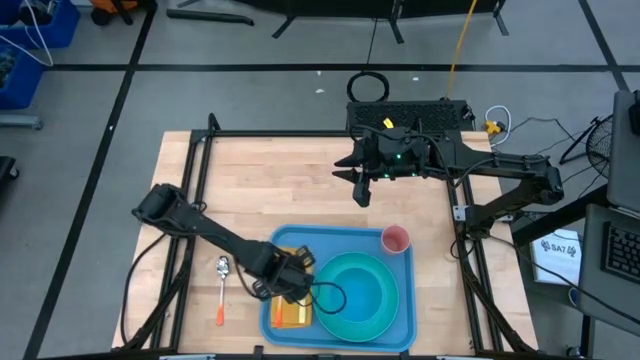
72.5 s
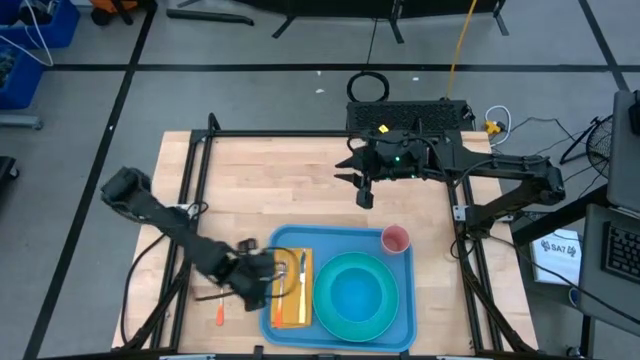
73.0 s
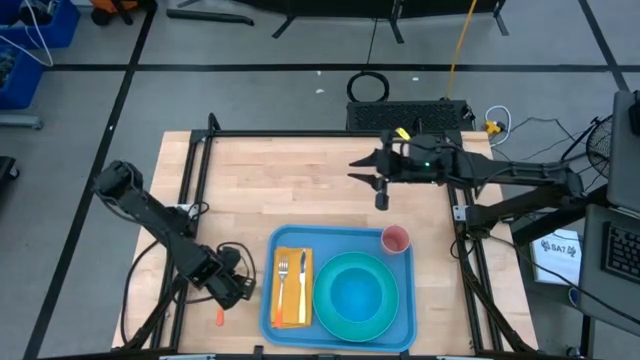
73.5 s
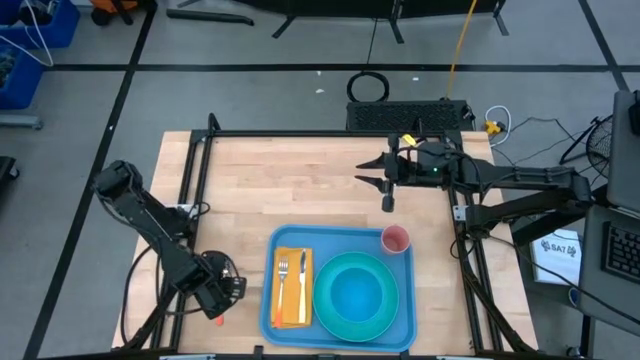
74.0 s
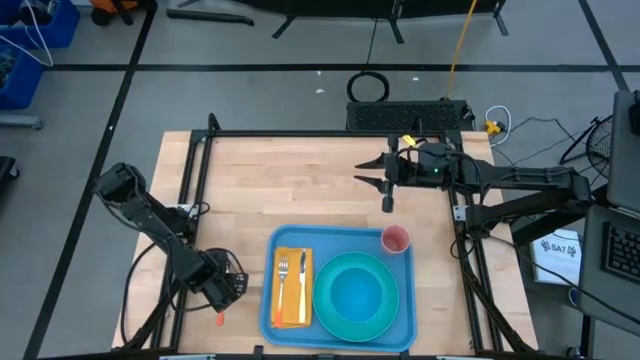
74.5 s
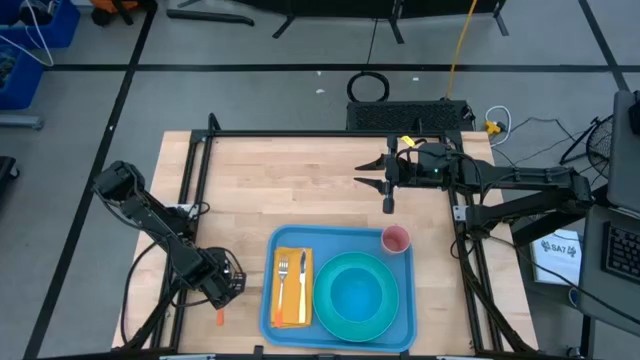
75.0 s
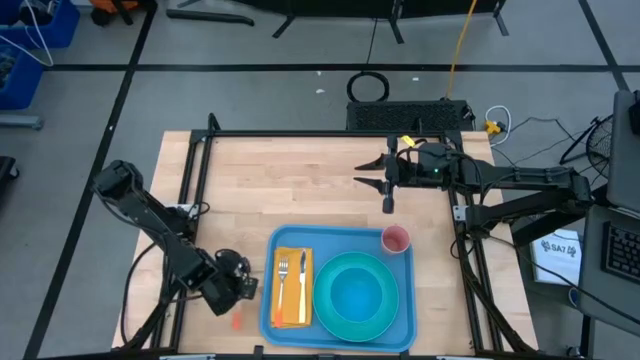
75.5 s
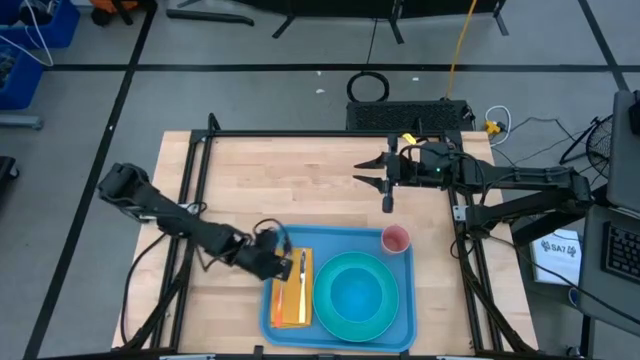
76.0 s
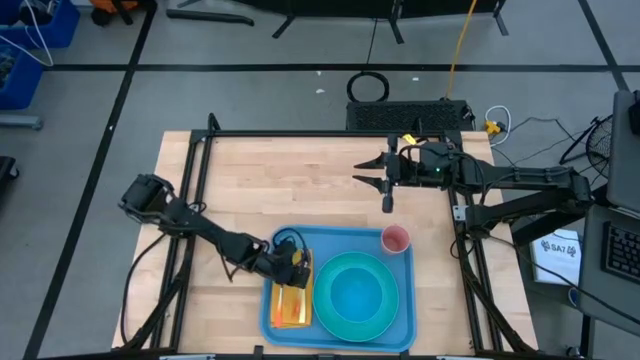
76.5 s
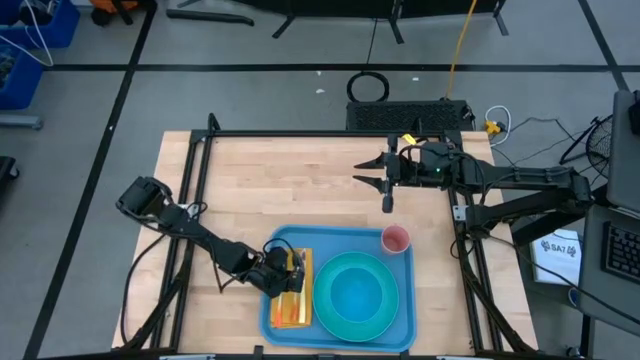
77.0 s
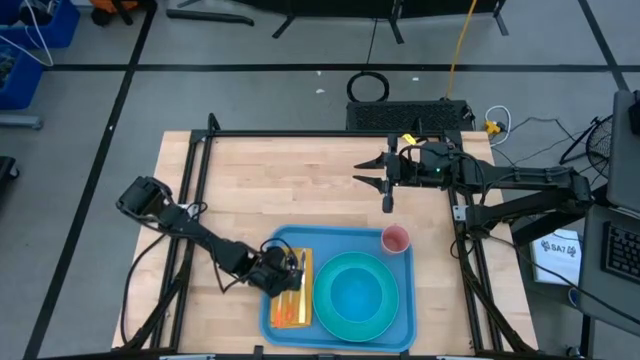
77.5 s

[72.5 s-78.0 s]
Task: Set up tray
Put the orange spoon on top of the yellow table napkin

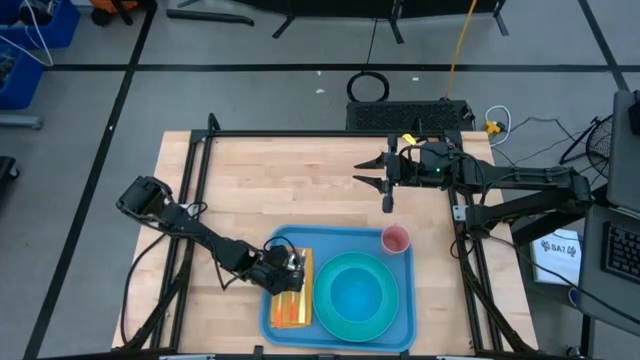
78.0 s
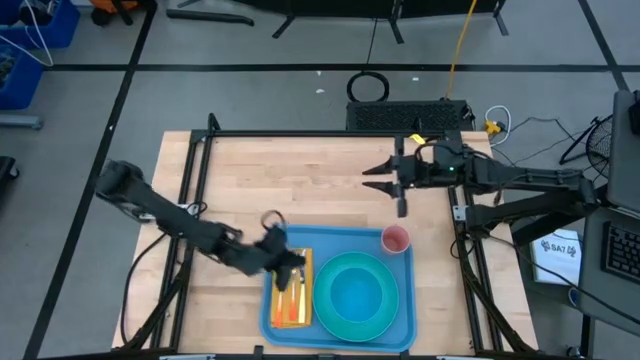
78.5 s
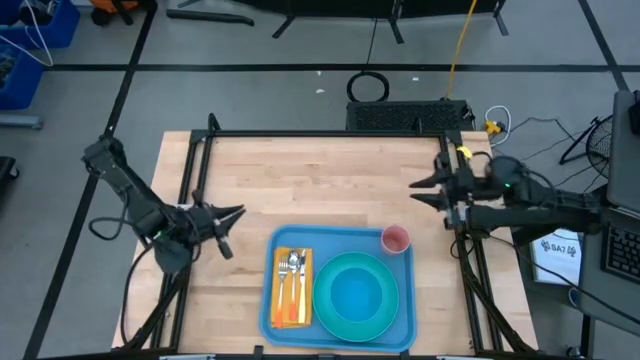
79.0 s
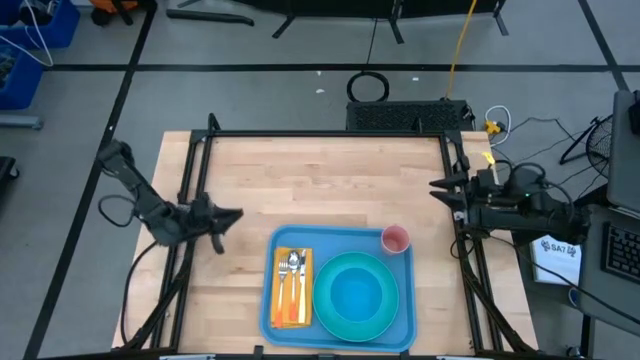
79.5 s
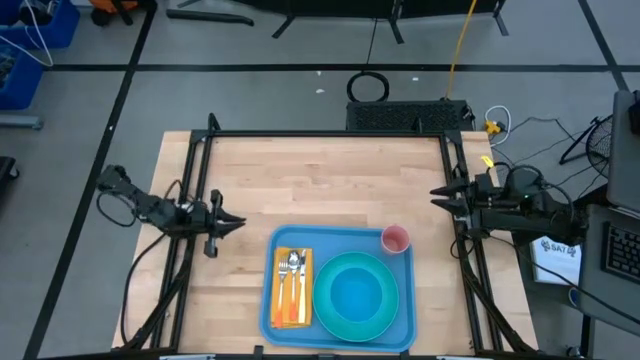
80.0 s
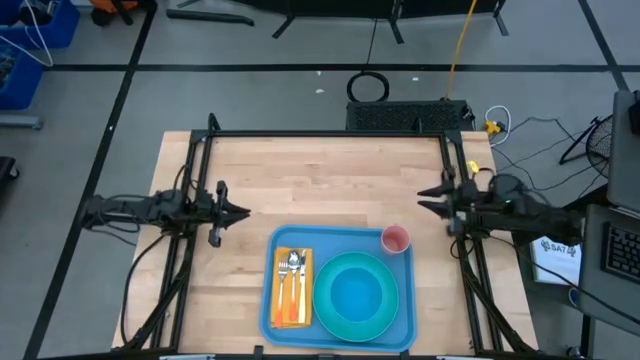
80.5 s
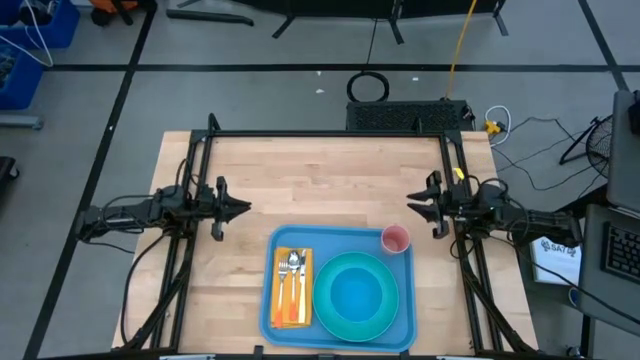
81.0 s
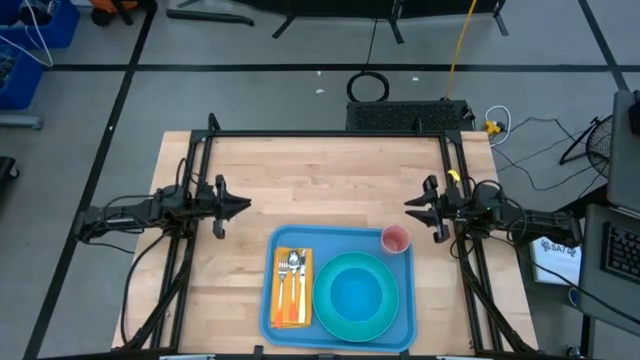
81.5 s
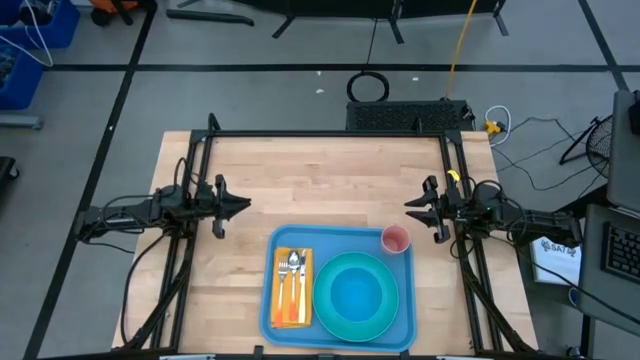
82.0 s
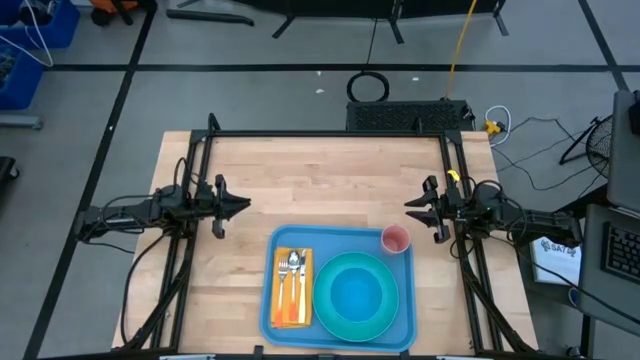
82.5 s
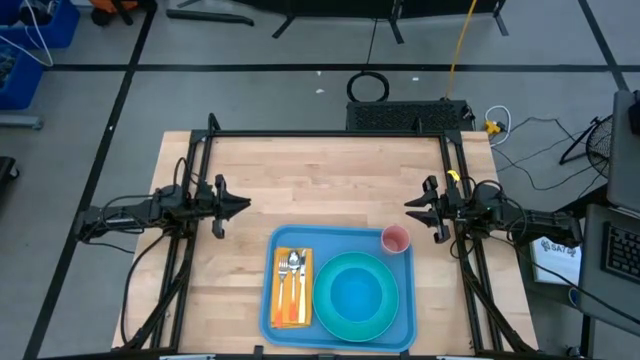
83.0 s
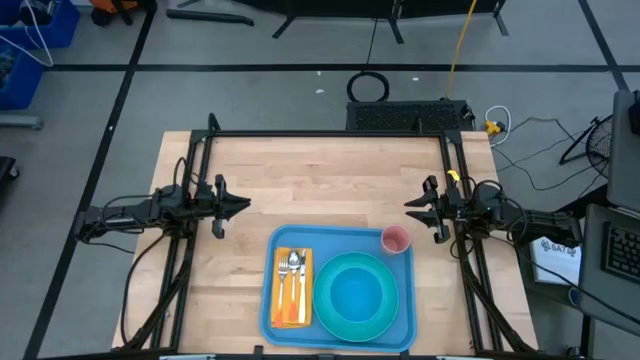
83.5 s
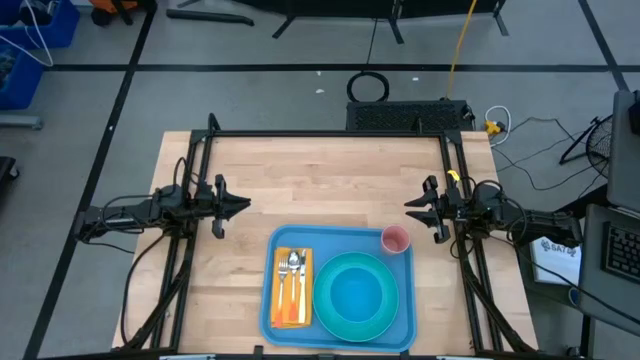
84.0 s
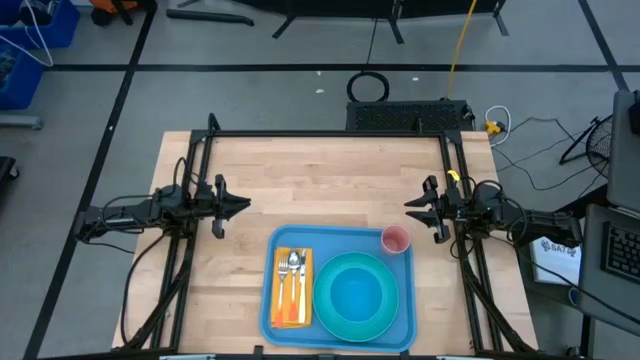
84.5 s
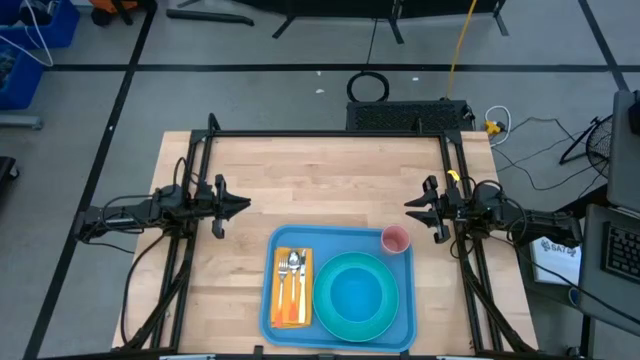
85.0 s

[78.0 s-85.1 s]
Return to Home Position

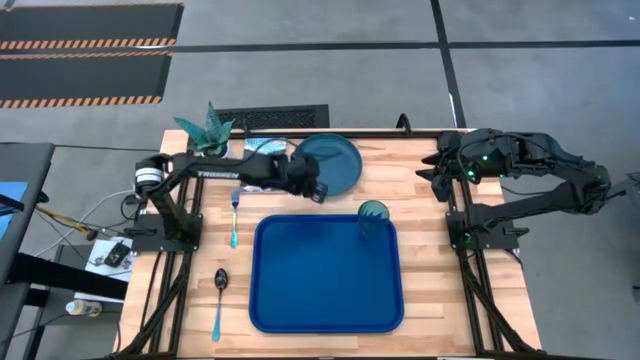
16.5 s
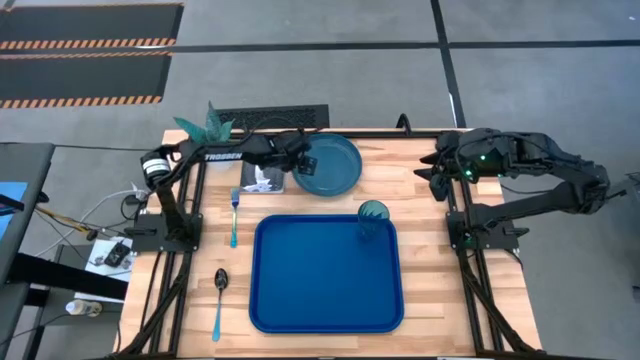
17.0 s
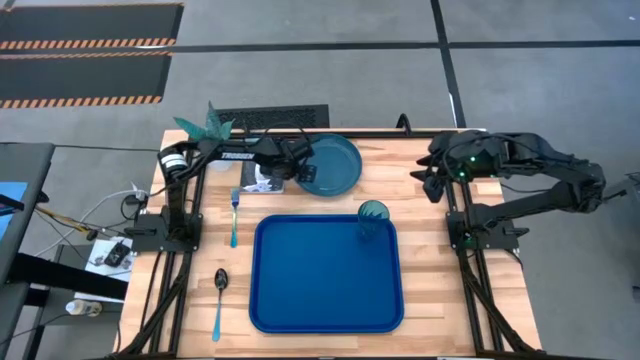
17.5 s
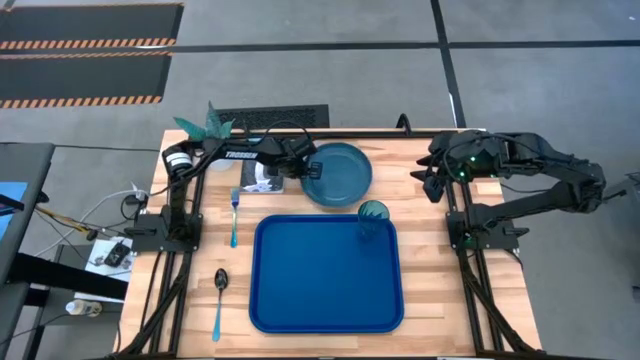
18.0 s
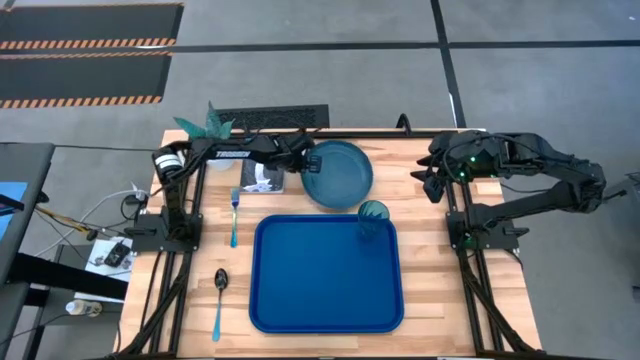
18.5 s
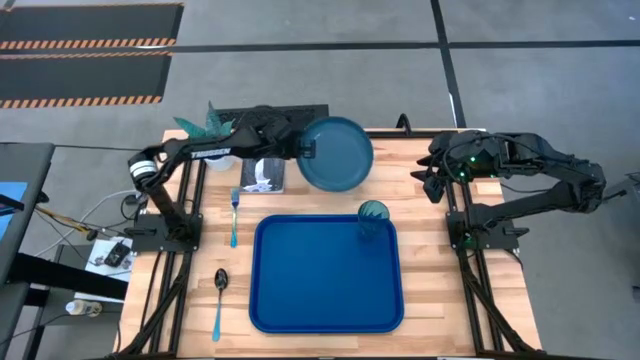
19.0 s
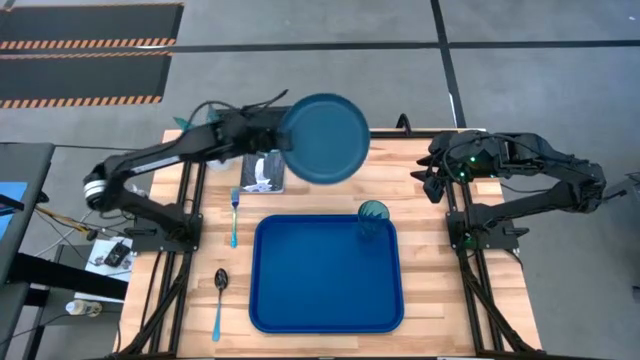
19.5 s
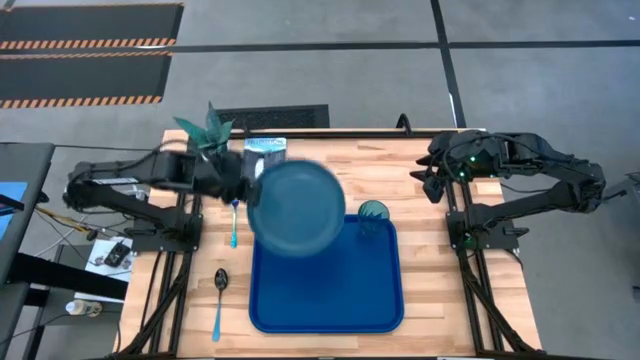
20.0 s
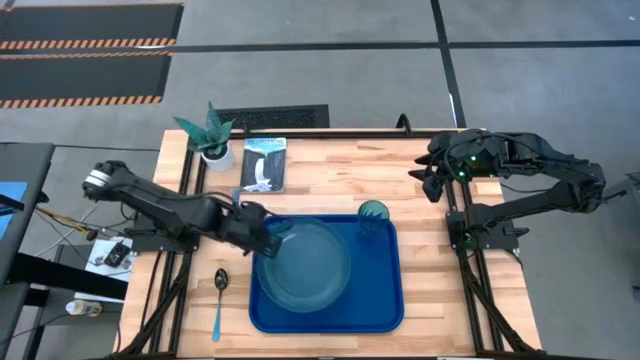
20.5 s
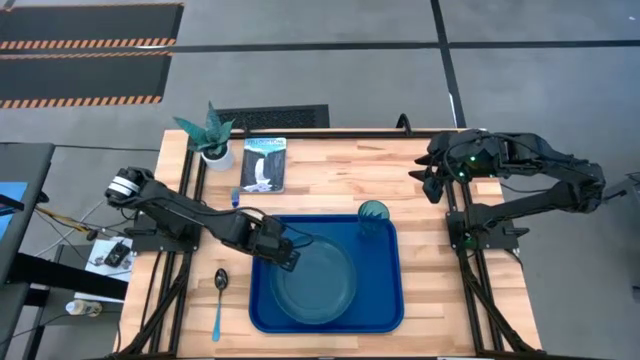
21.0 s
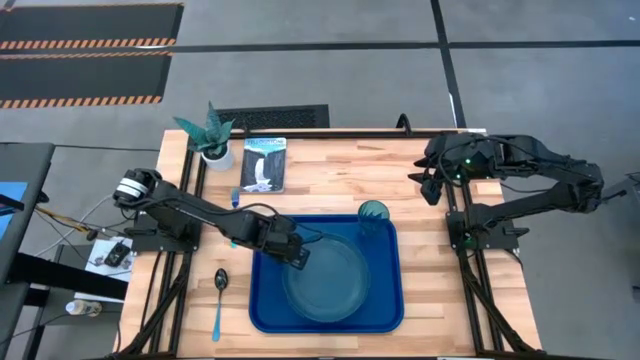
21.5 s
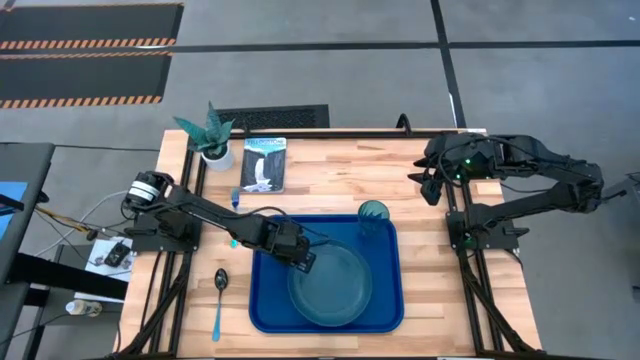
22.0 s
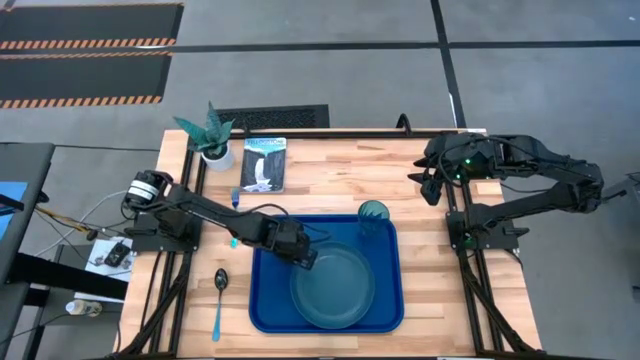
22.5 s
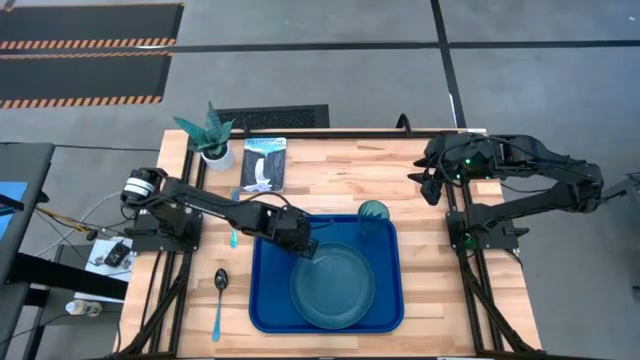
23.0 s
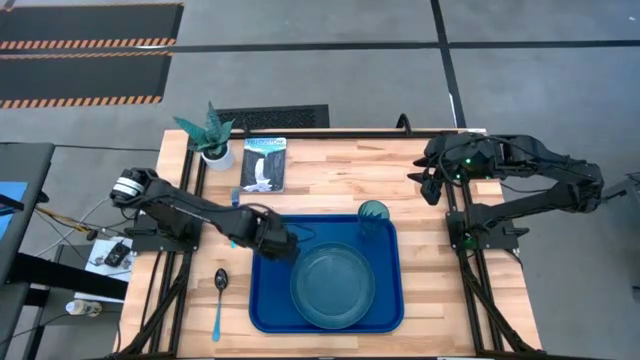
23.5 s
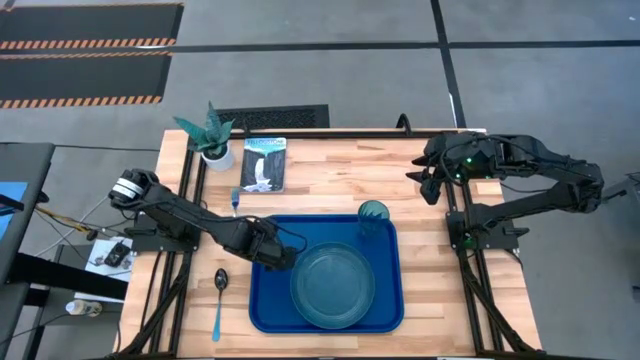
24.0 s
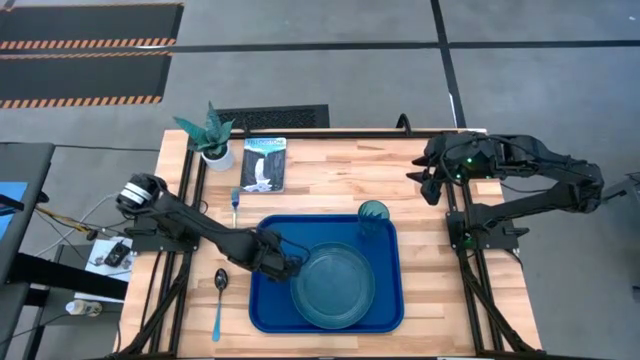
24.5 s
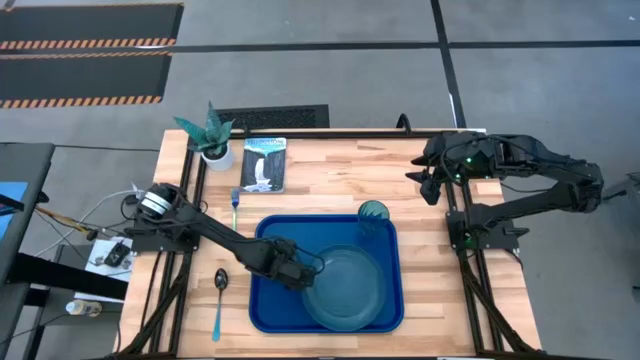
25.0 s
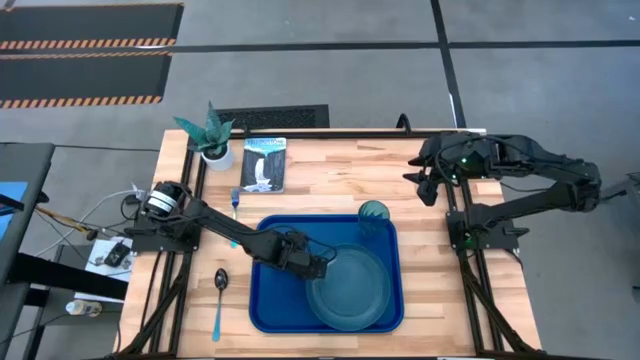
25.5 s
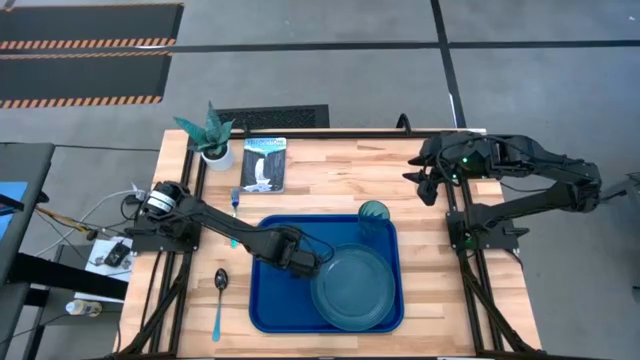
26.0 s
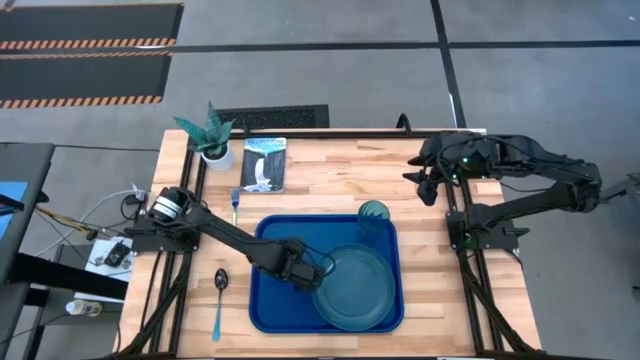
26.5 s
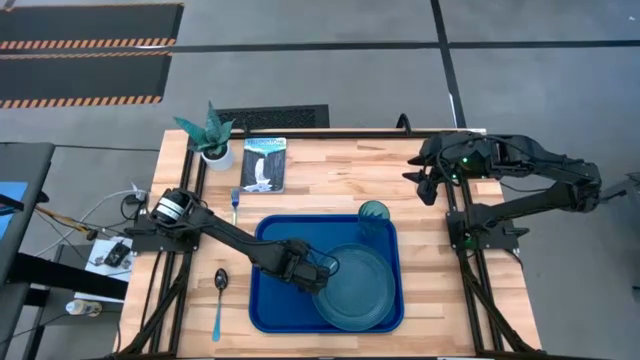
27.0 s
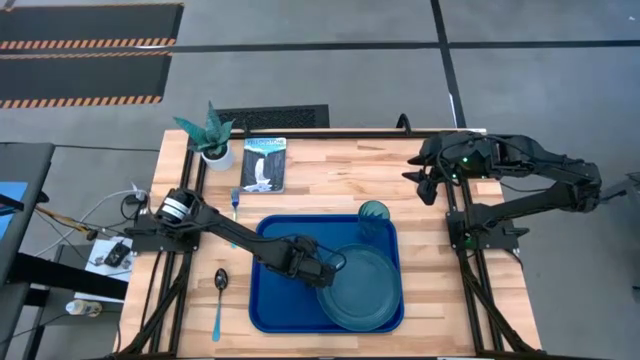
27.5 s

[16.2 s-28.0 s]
Task: Pick and place plate/cup/fork/spoon on tray
Put the blue plate on the blue tray to the bottom of the blue cup
